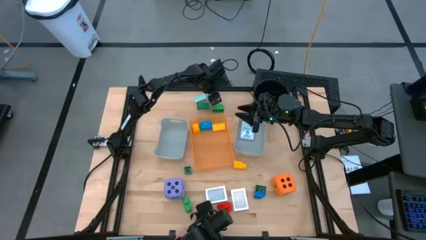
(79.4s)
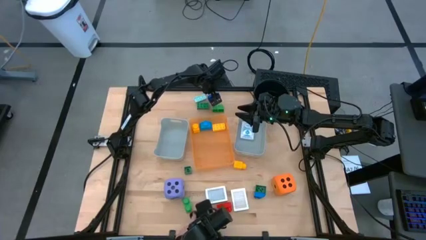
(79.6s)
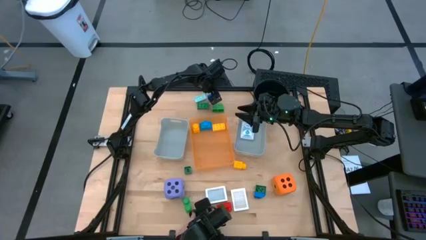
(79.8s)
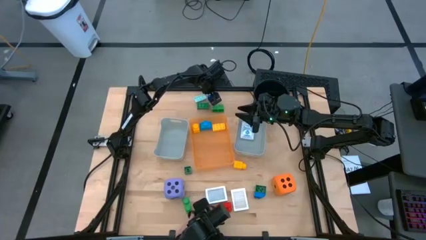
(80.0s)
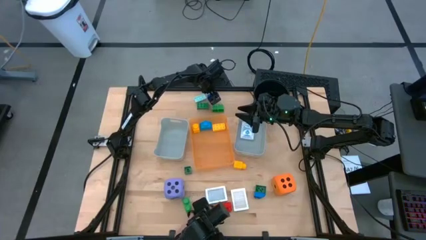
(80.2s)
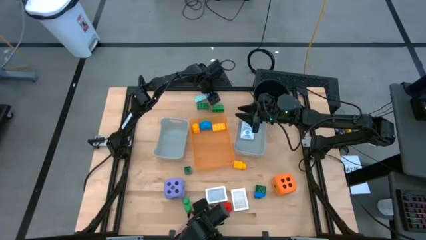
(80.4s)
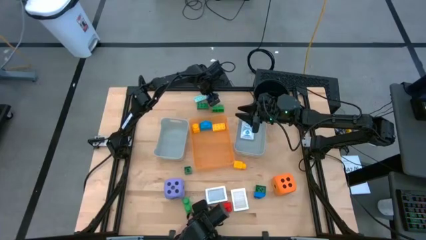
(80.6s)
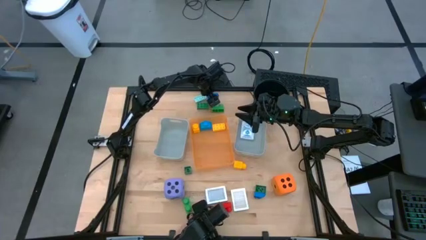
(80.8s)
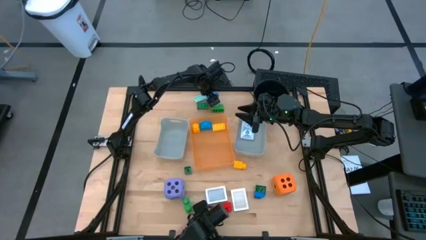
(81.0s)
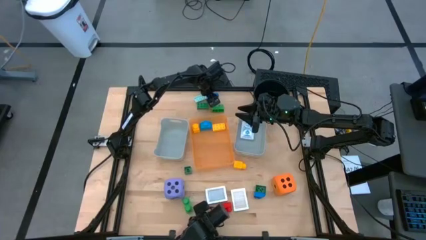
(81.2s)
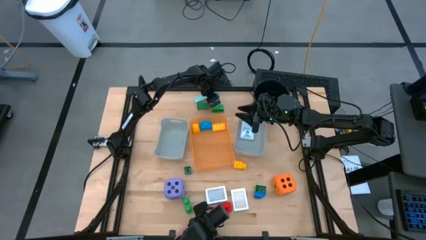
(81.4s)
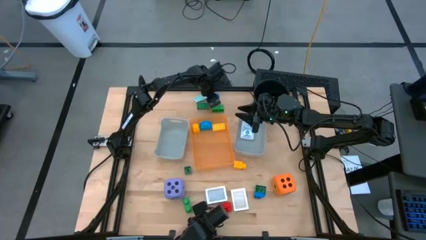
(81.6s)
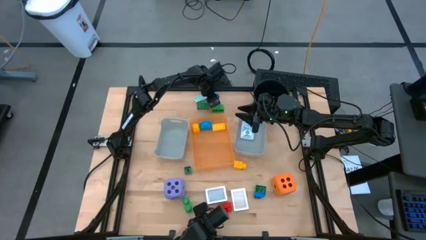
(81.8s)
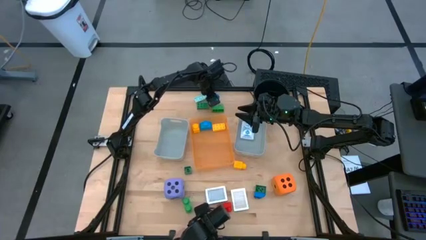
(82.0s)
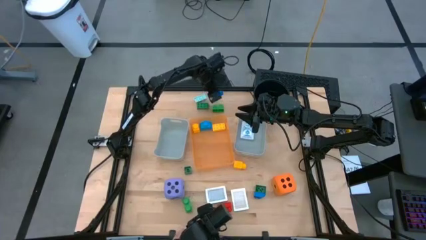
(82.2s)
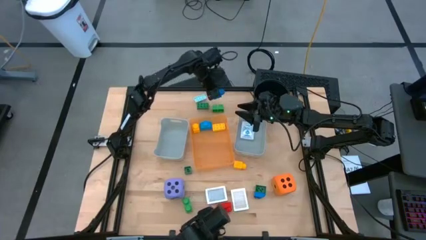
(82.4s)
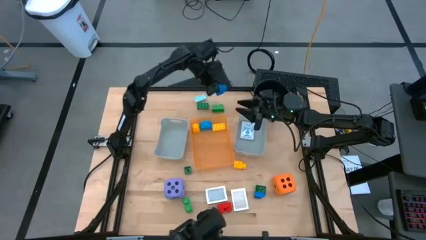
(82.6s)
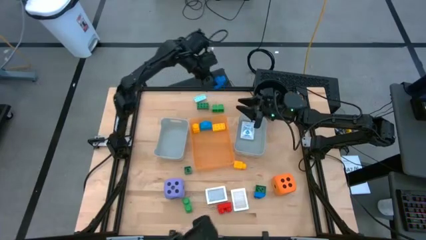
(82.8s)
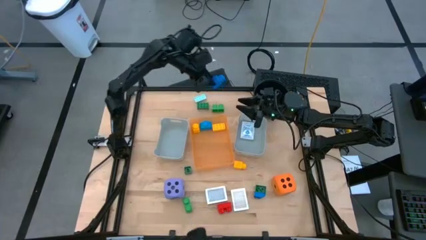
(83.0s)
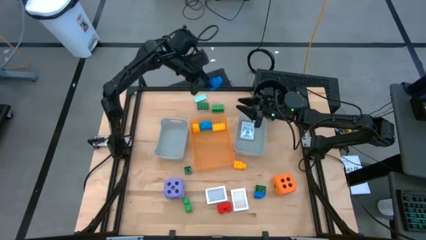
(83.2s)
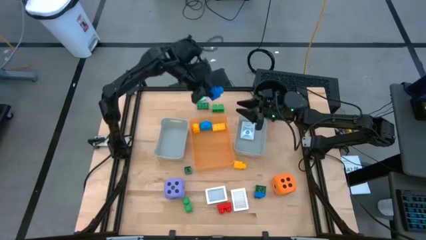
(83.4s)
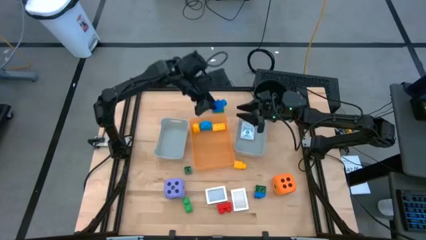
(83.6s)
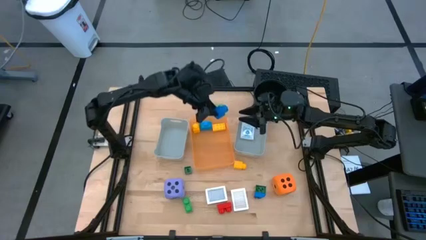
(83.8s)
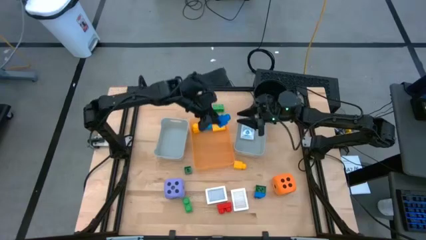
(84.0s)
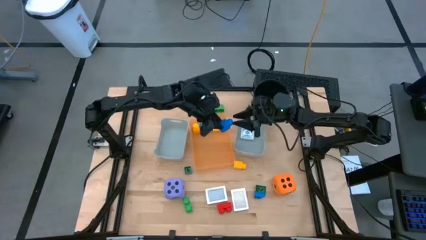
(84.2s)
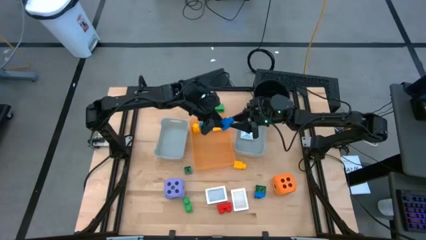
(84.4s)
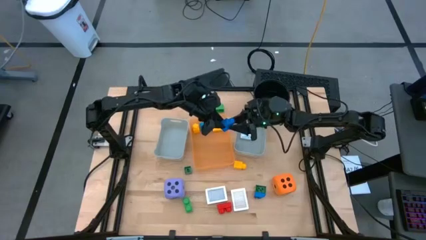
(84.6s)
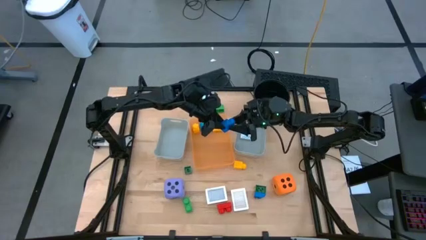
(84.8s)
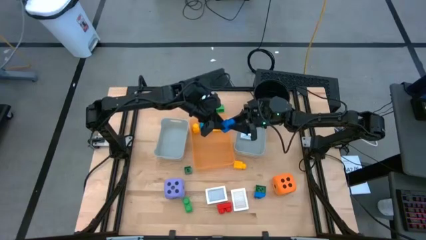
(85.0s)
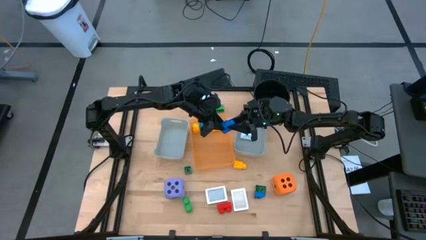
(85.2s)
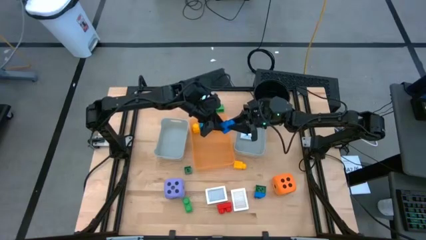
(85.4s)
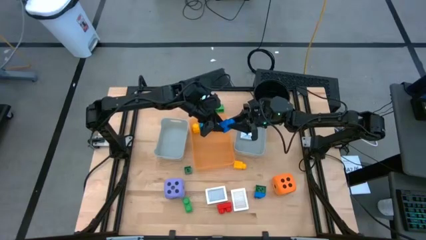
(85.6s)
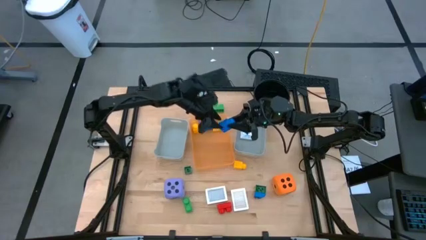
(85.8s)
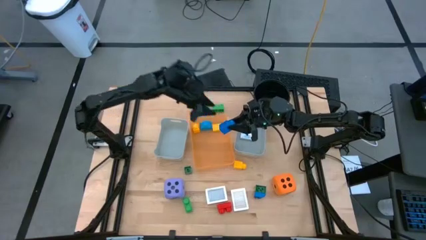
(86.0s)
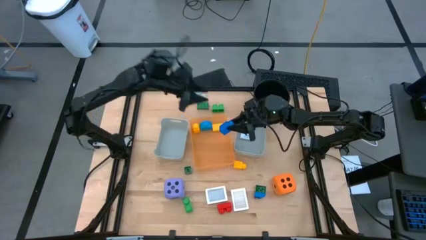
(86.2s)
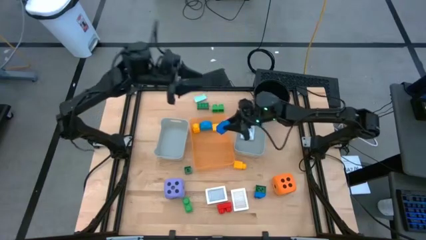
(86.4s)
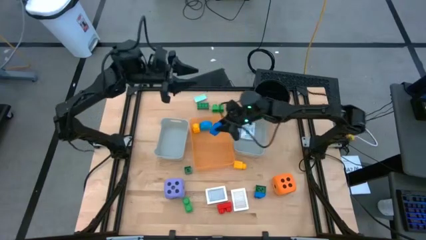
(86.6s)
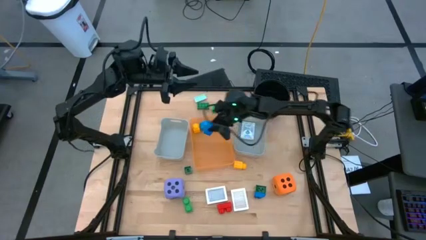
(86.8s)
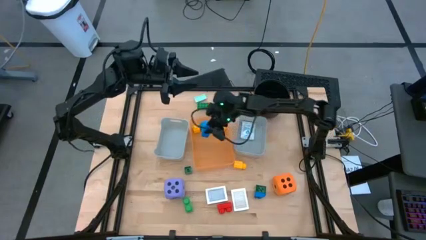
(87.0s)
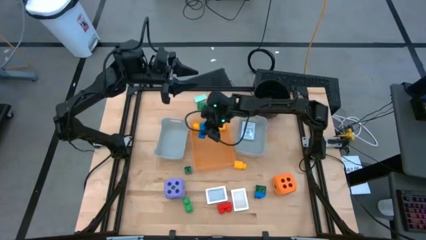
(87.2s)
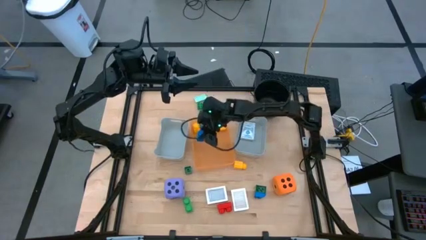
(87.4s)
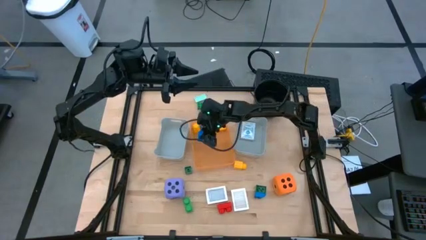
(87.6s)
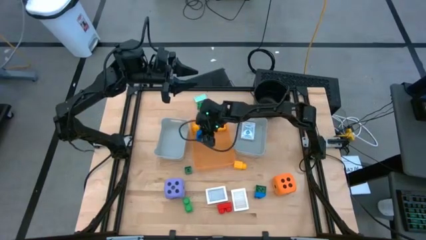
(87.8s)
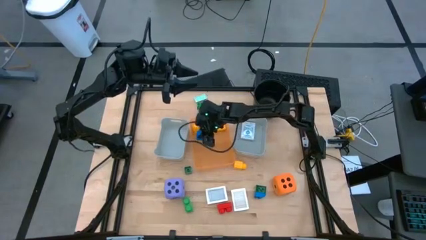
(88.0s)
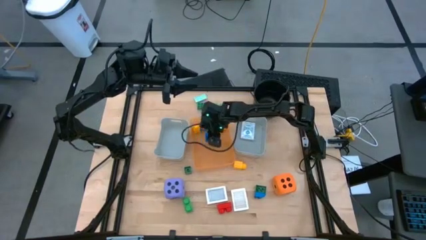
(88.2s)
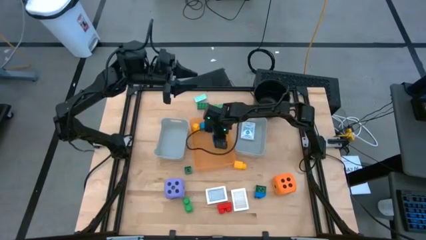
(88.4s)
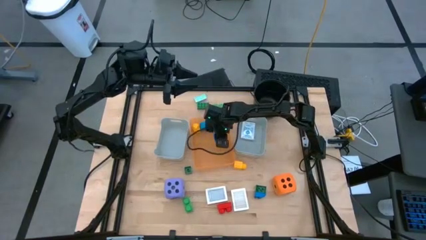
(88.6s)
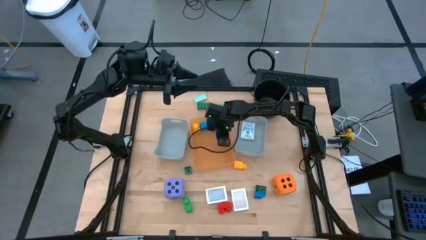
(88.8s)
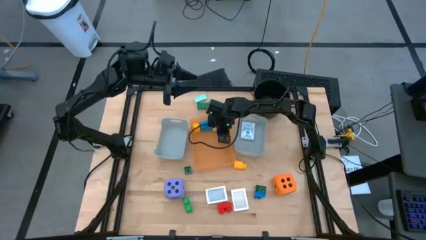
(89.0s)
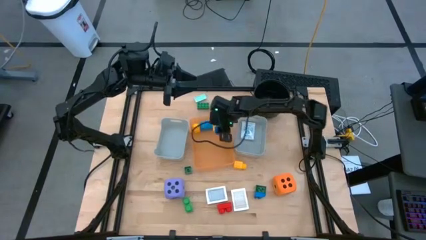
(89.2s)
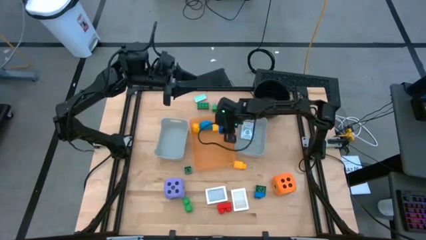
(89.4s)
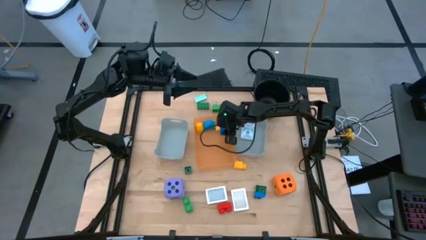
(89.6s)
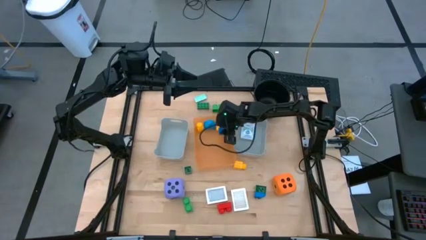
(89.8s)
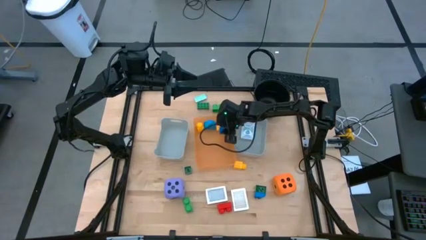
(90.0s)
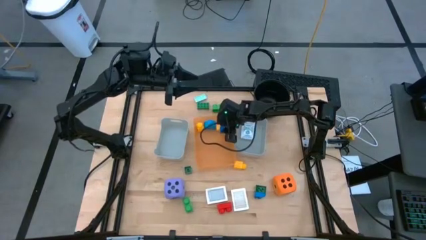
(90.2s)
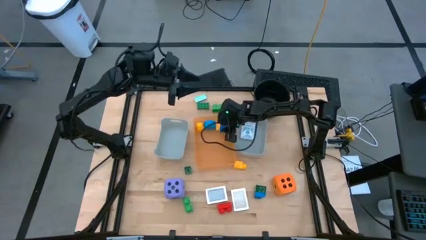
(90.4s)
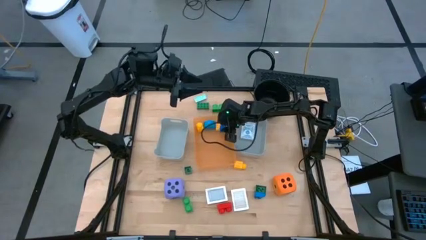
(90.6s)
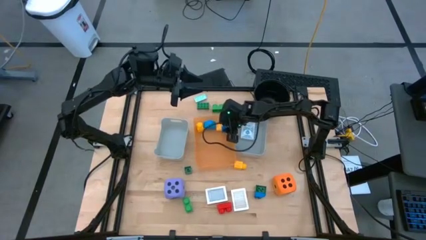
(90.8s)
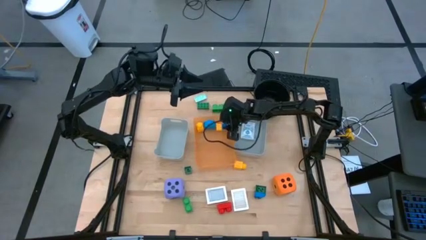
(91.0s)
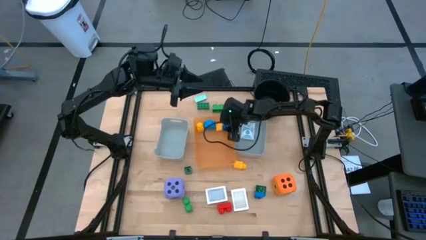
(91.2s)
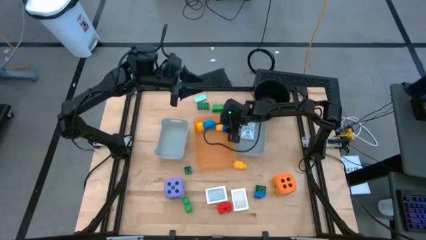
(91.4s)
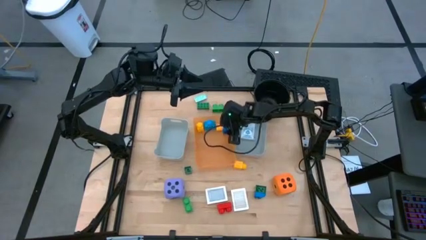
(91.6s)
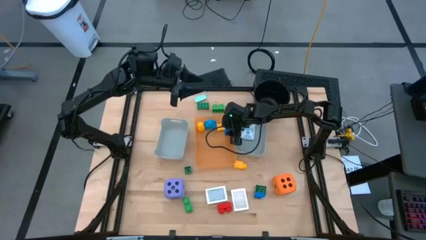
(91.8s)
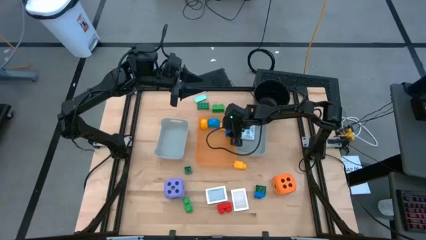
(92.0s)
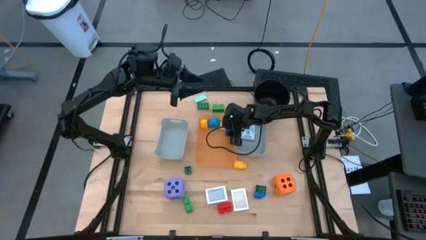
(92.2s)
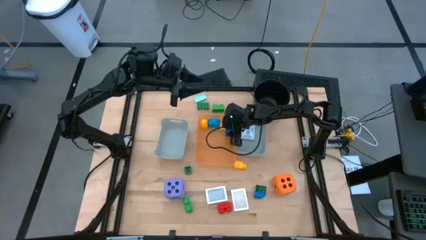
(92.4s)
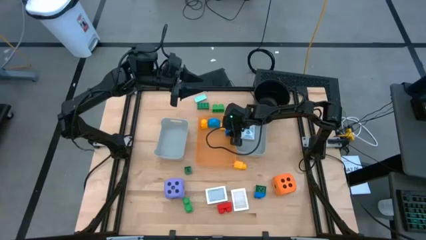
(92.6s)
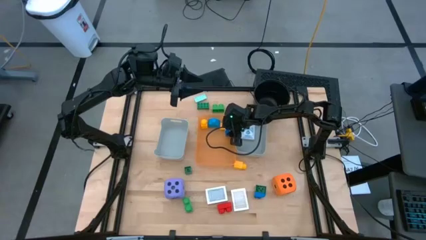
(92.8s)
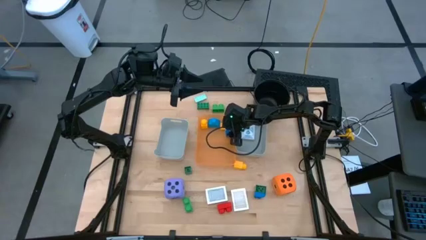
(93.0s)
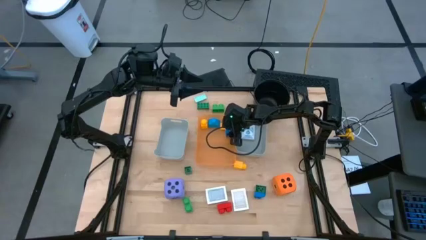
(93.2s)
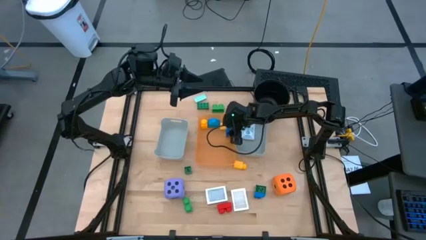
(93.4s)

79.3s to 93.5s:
Task: Pick & Place Toys
Put the blue game piece block into the orange bin

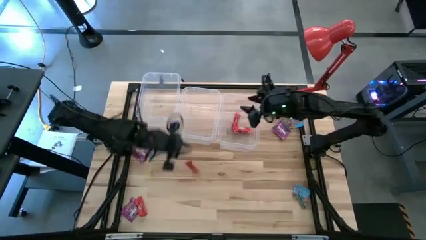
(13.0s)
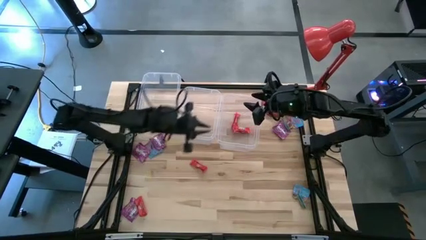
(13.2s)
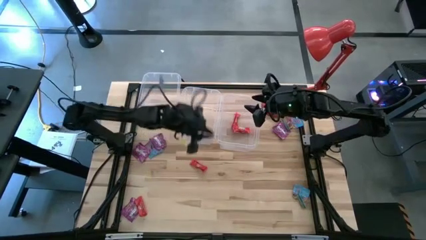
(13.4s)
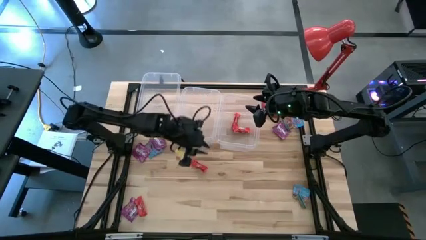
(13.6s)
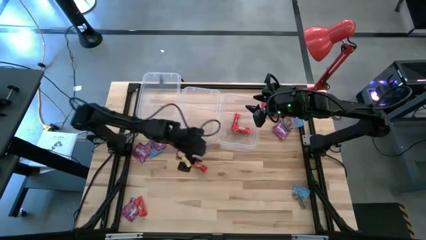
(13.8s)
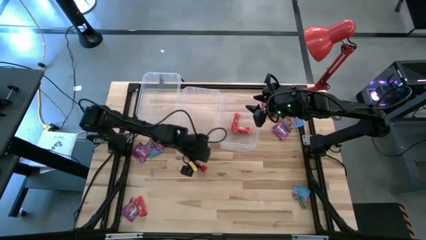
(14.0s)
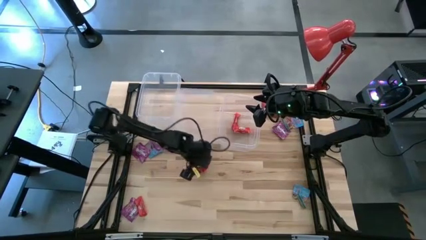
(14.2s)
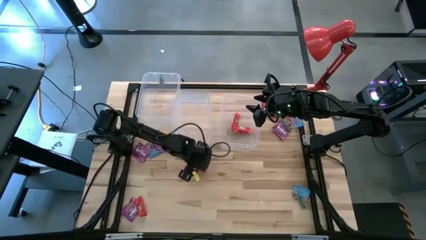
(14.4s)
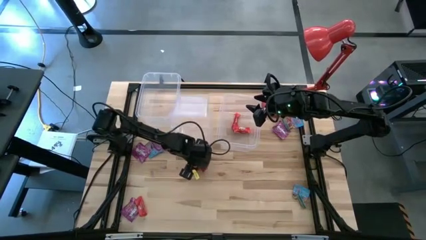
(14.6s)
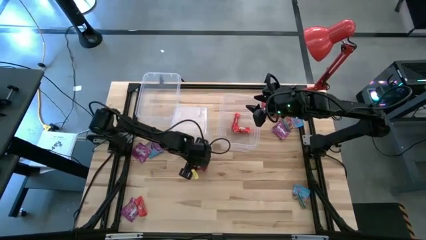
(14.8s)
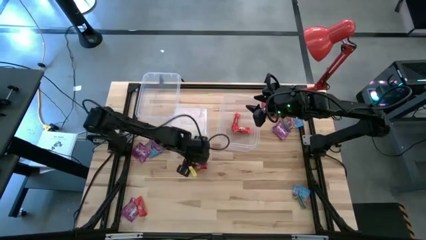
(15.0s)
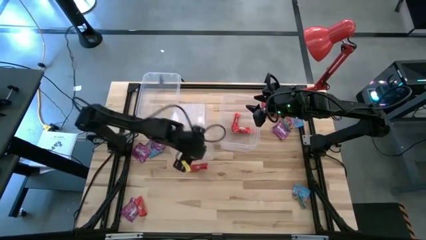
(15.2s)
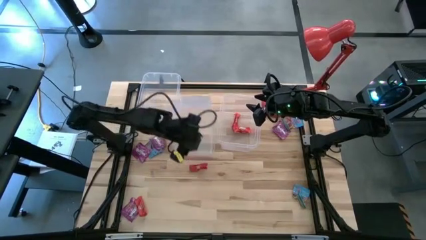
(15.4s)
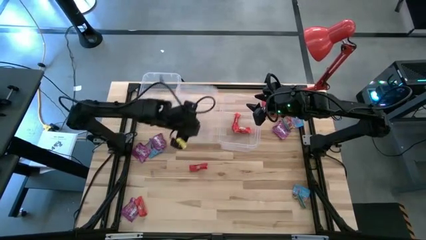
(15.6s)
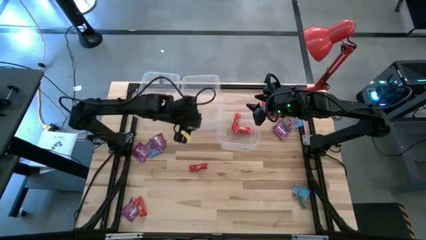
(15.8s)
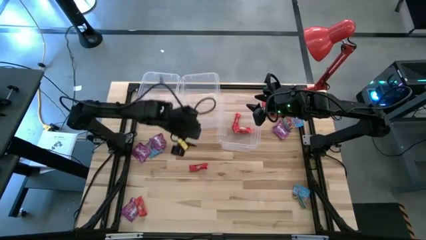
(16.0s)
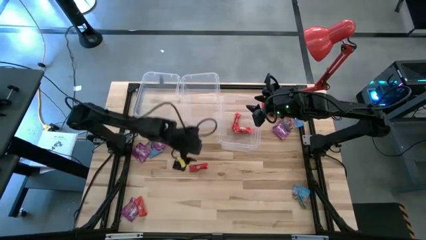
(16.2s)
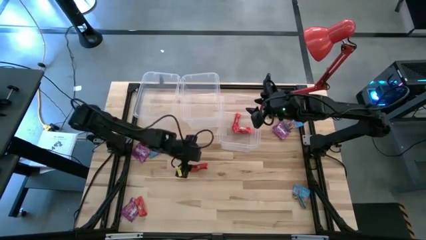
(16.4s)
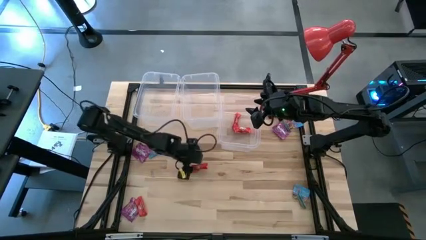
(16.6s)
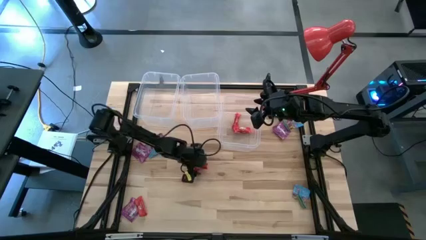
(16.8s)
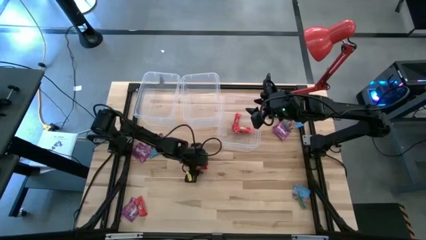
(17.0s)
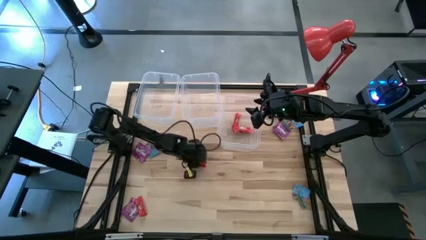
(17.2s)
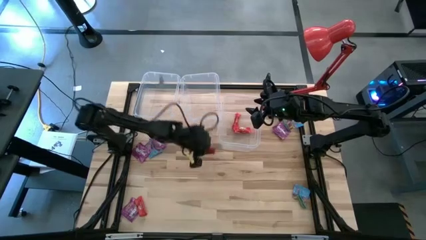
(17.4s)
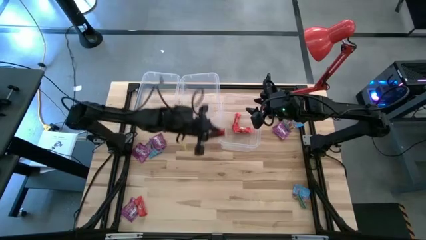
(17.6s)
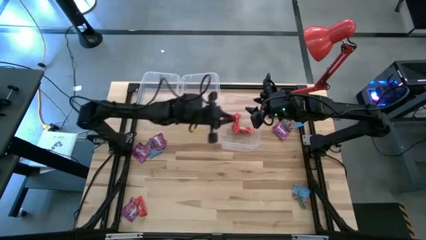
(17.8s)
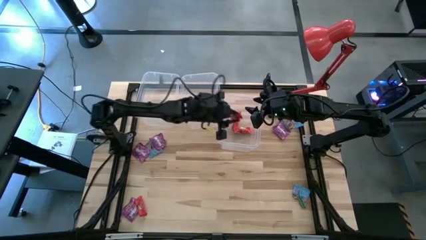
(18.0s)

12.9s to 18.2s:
Task: Sort candy
Put the top red candy into the top right transparent bin
